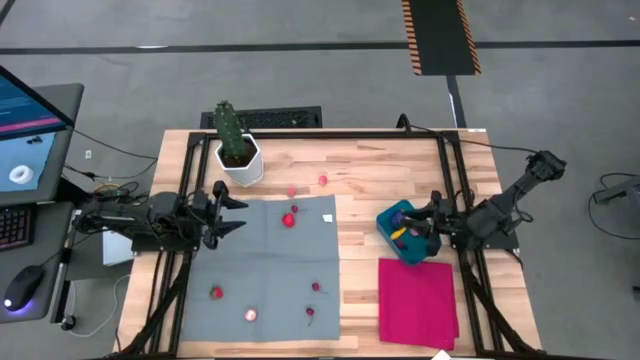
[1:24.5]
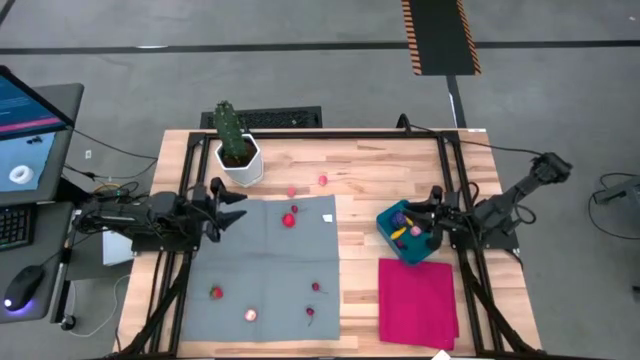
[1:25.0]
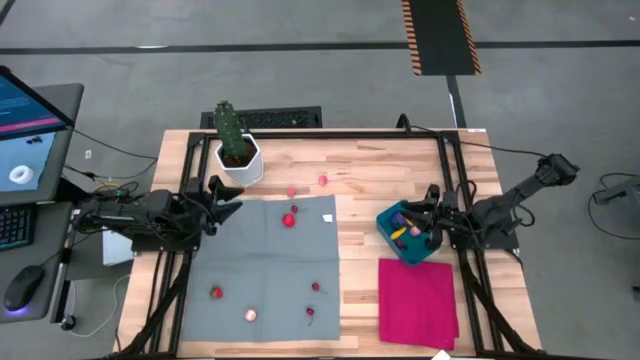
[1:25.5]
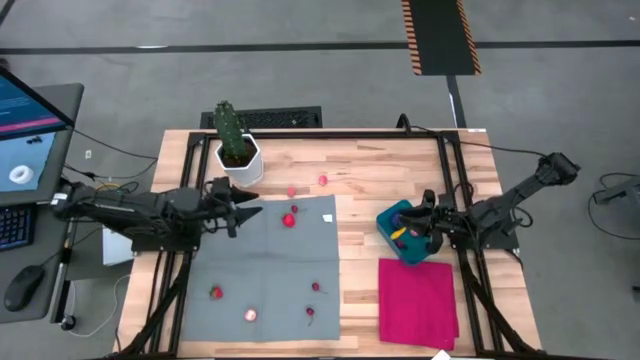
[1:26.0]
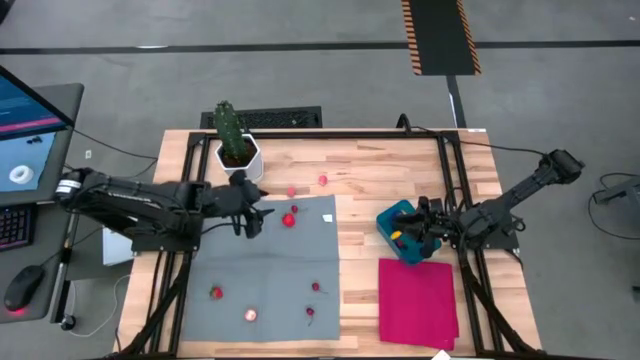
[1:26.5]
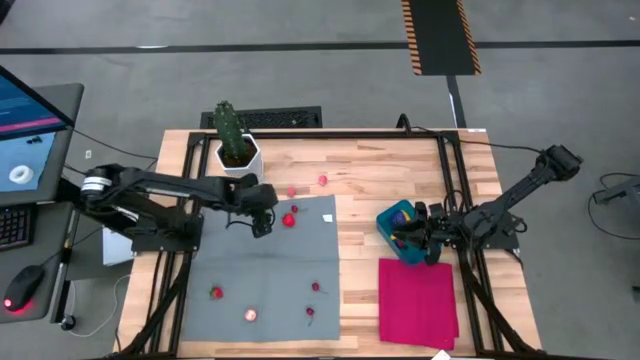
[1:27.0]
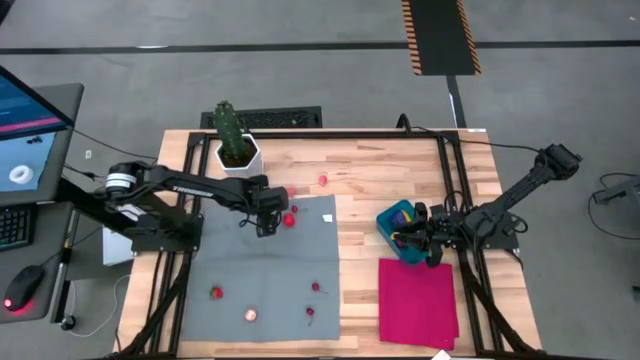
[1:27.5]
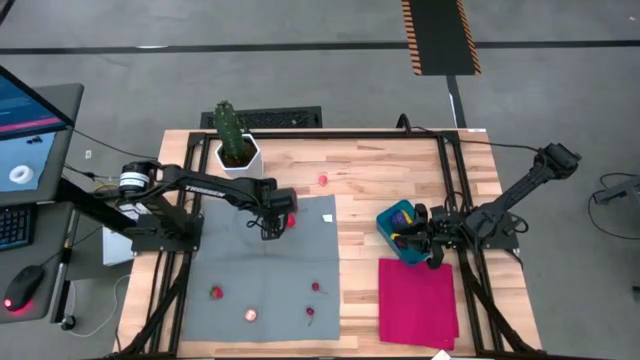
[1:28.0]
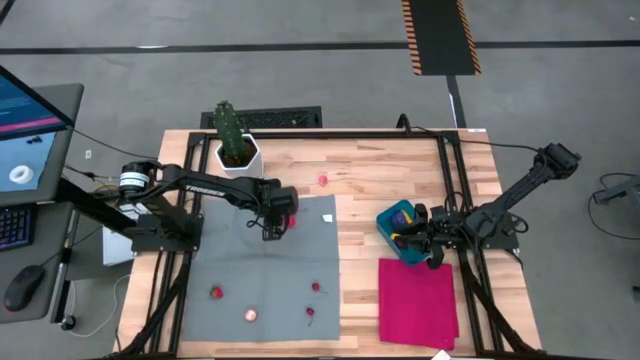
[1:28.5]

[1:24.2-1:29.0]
Task: Pick and placing Produce into tupperware
Put the red strawberry into the blue bin

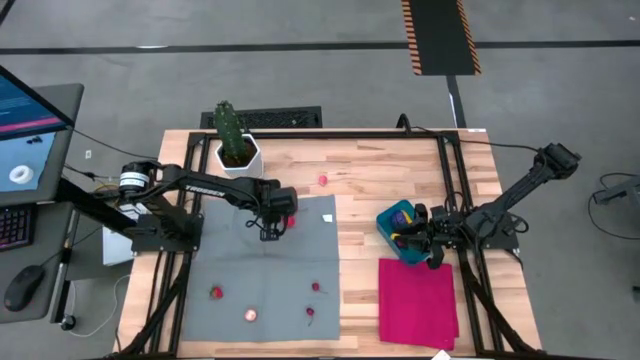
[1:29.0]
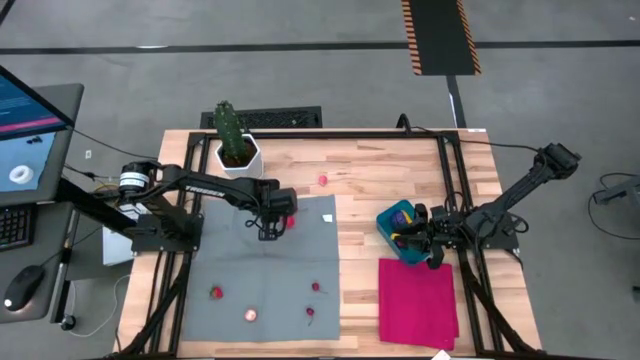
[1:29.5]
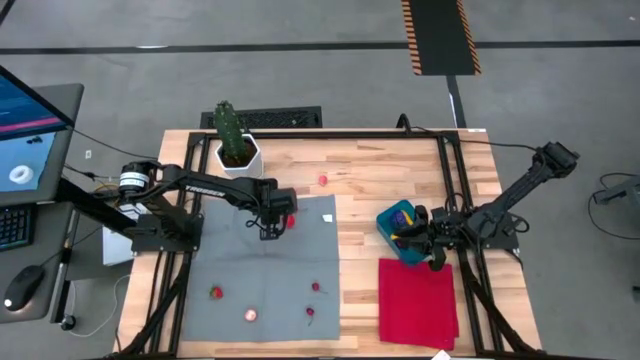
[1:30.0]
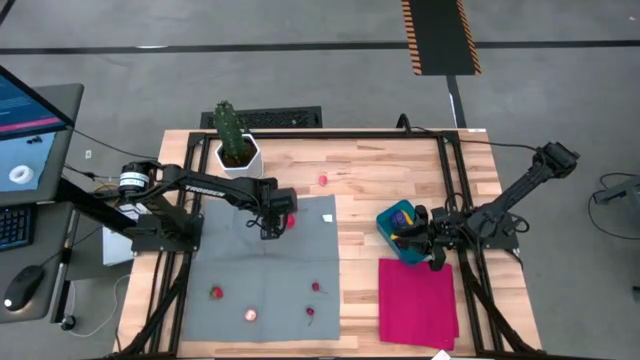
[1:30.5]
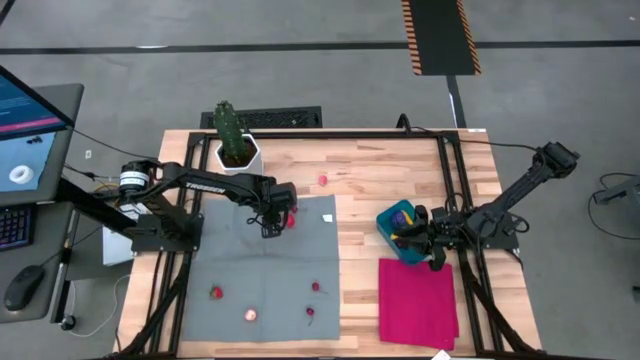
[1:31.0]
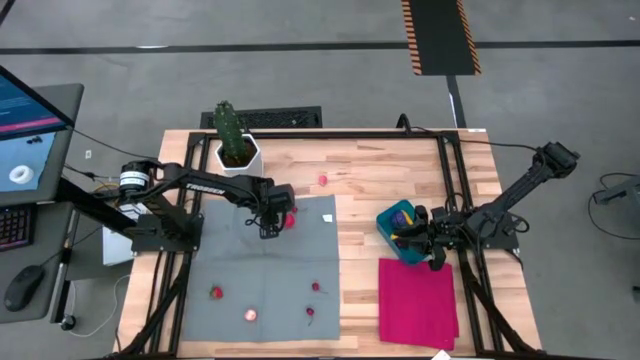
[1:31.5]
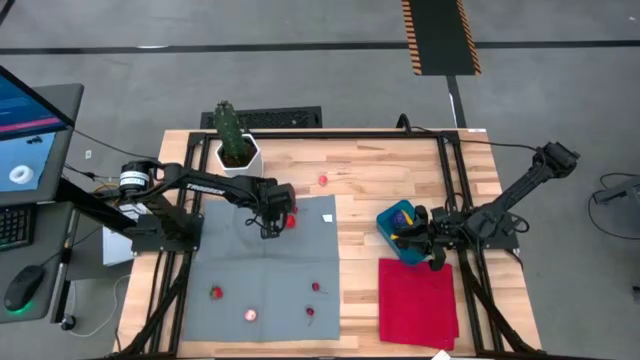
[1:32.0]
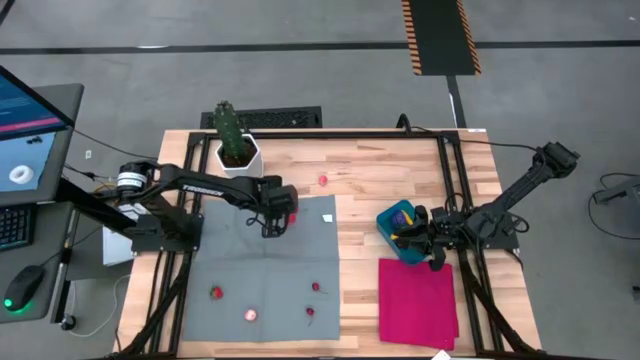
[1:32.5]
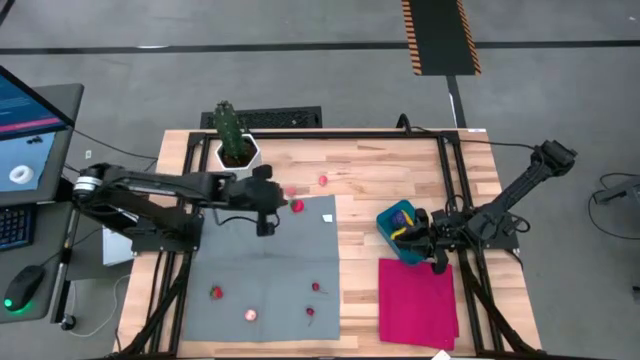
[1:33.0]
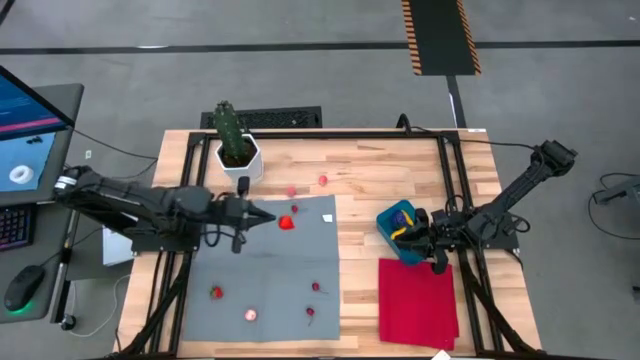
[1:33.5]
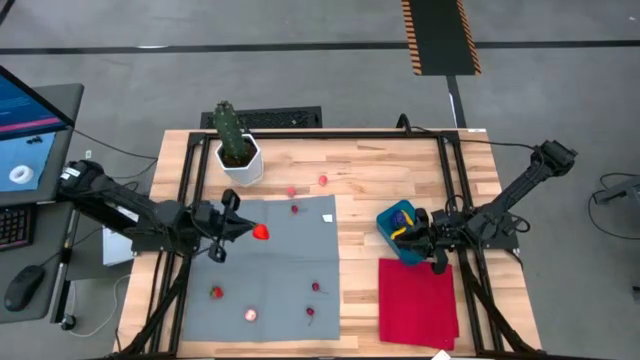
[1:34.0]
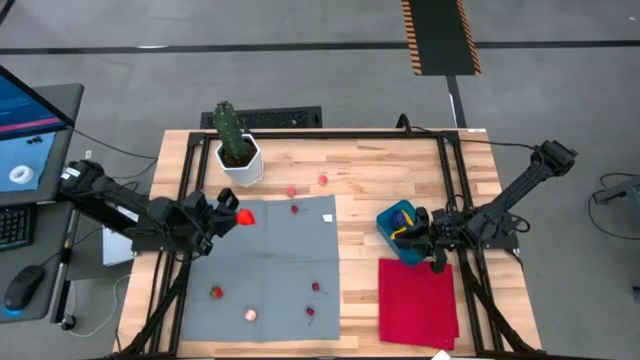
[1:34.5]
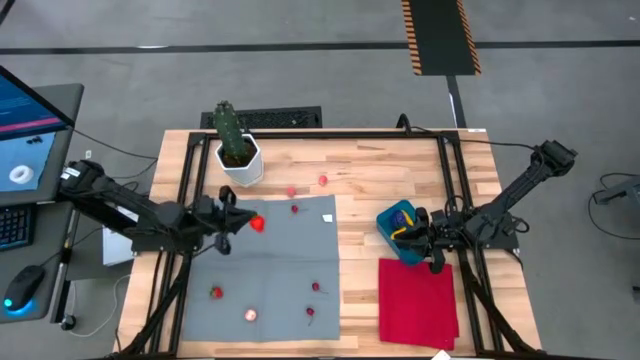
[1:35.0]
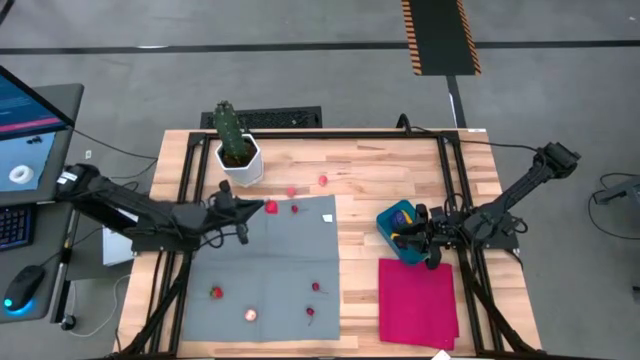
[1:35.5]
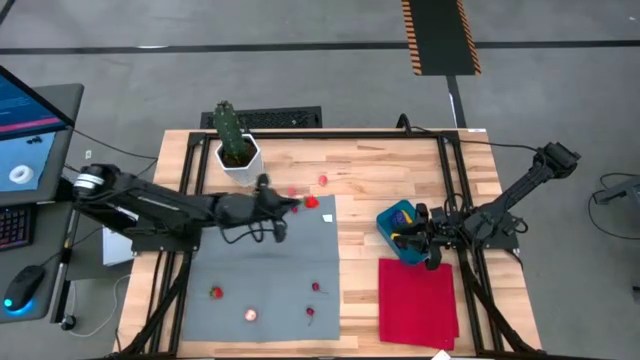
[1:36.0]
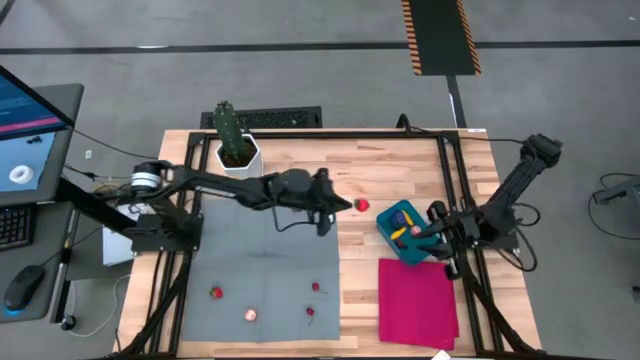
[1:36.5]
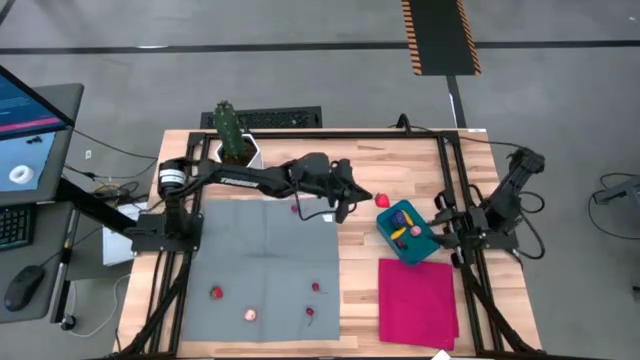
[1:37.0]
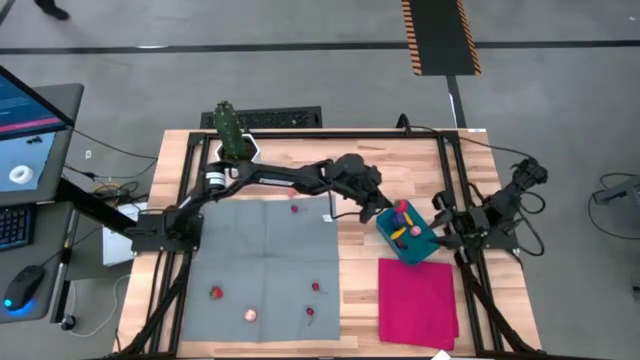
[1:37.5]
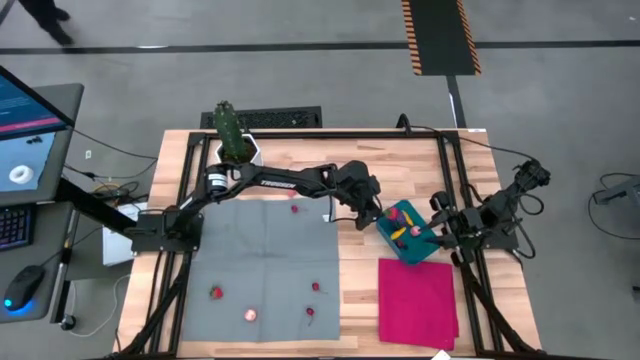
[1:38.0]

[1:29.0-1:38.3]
Put the red strawberry into the blue bin

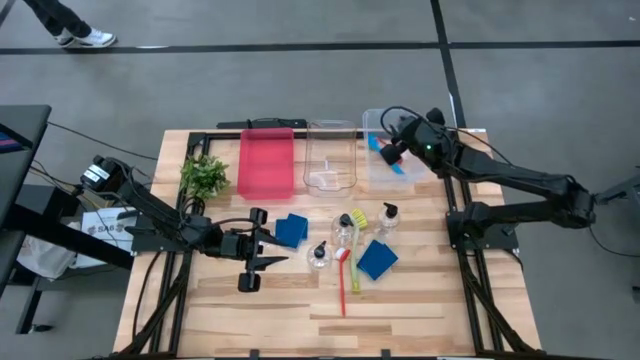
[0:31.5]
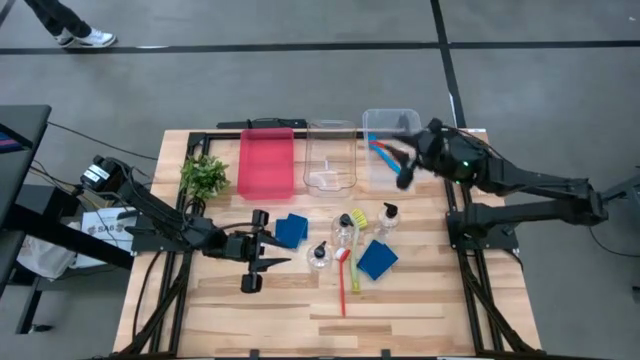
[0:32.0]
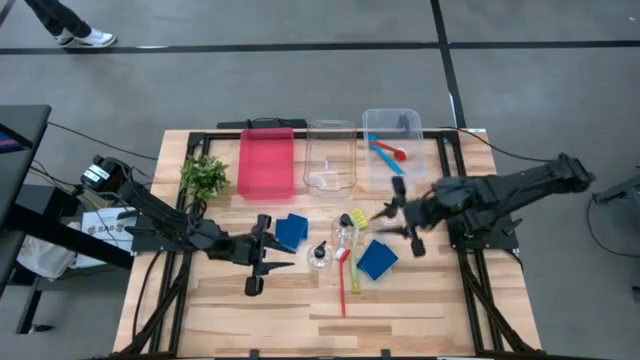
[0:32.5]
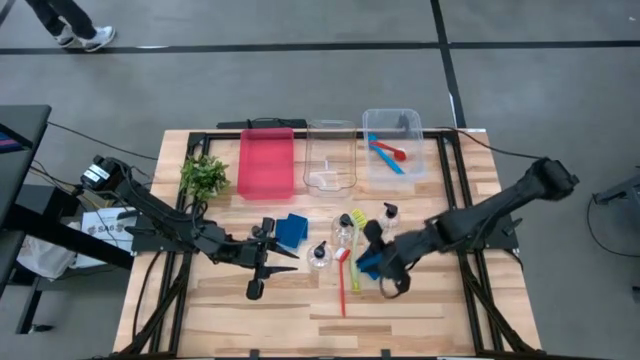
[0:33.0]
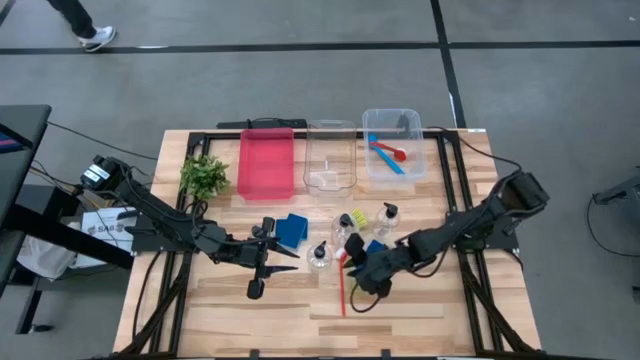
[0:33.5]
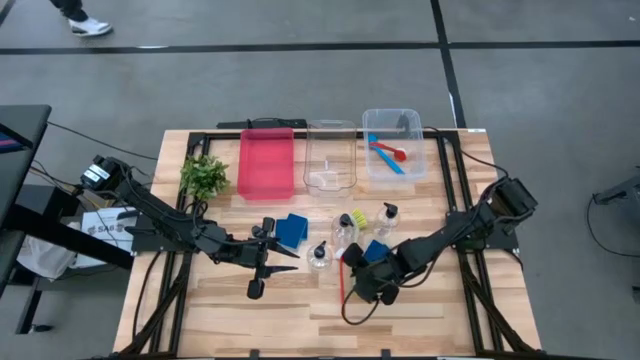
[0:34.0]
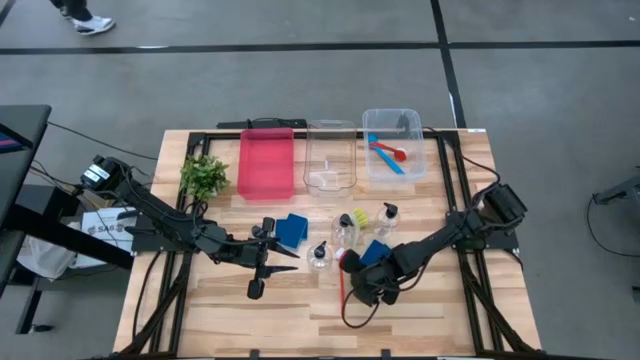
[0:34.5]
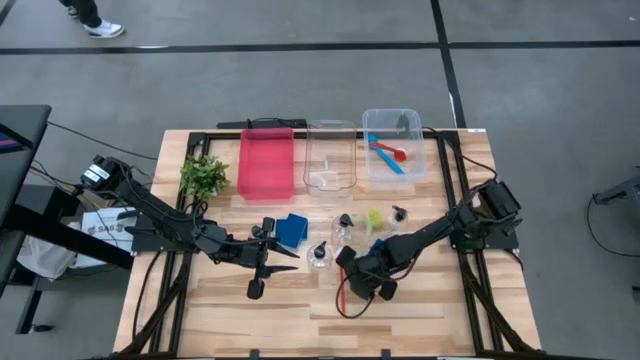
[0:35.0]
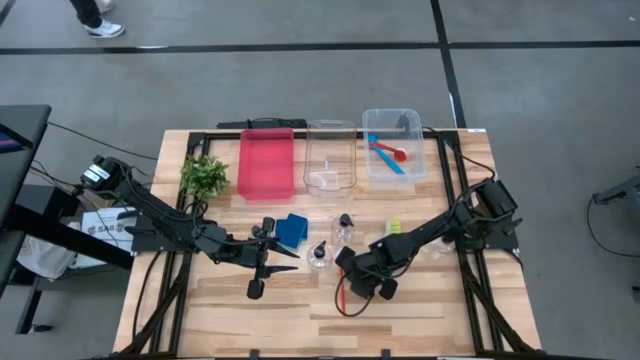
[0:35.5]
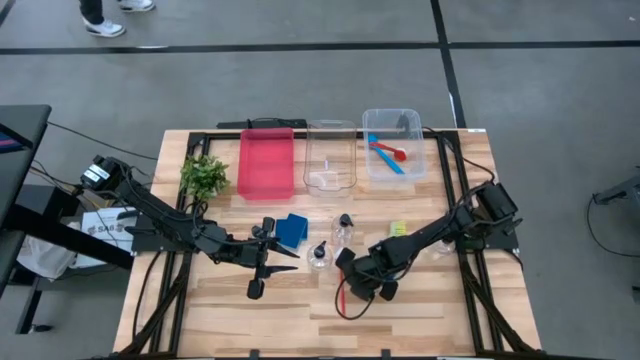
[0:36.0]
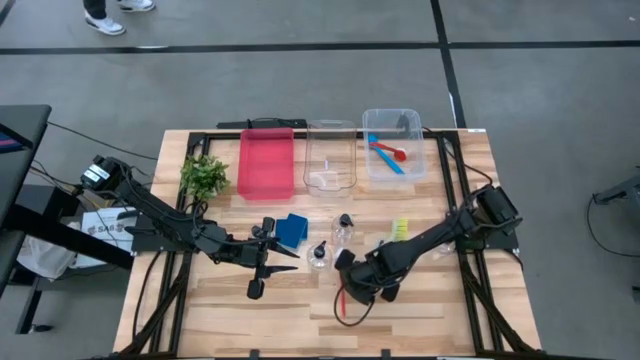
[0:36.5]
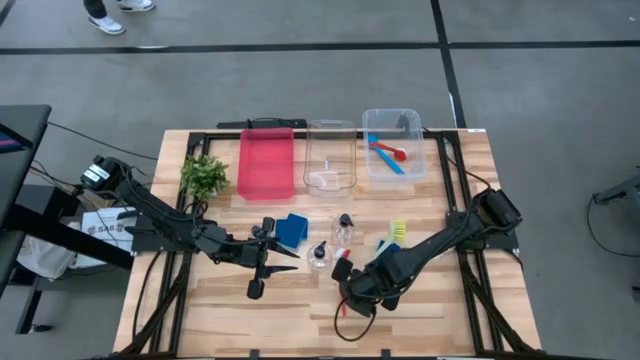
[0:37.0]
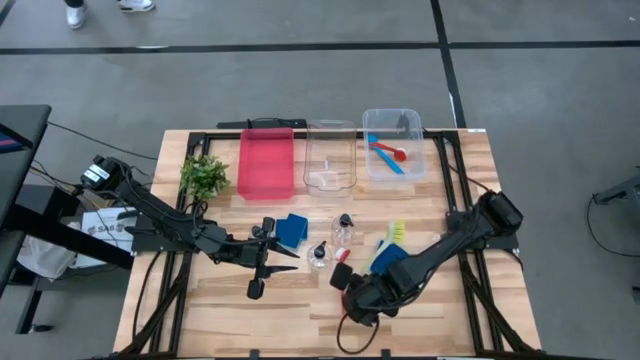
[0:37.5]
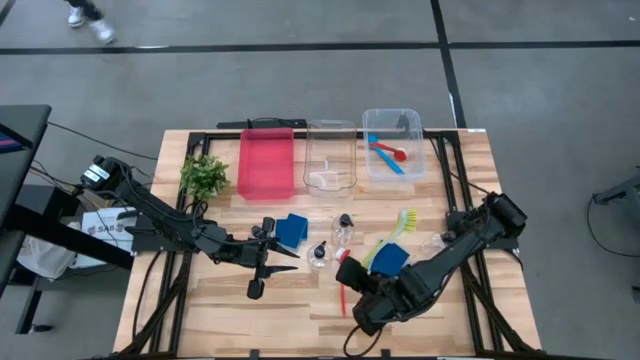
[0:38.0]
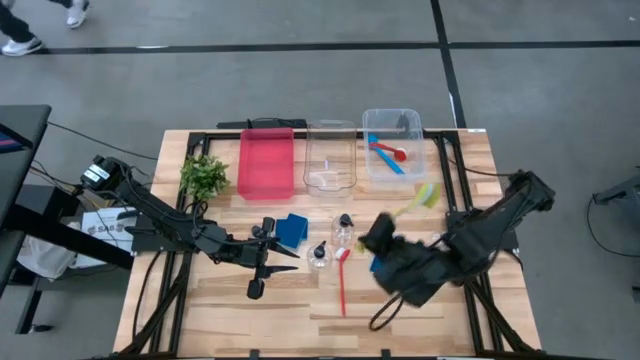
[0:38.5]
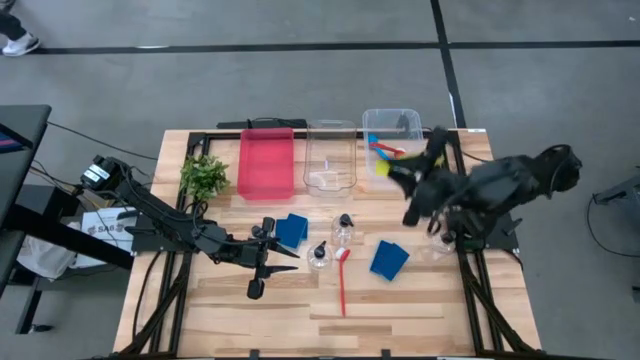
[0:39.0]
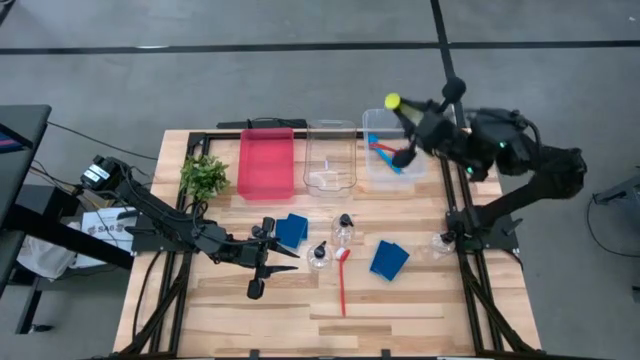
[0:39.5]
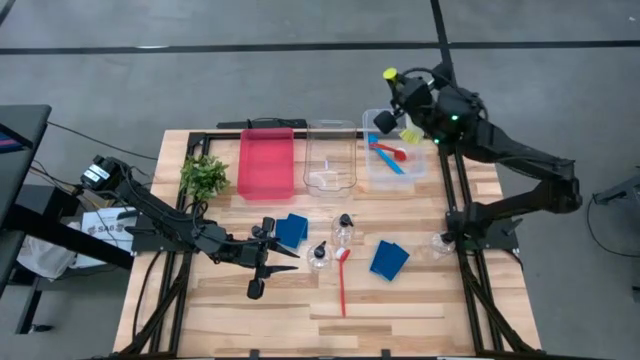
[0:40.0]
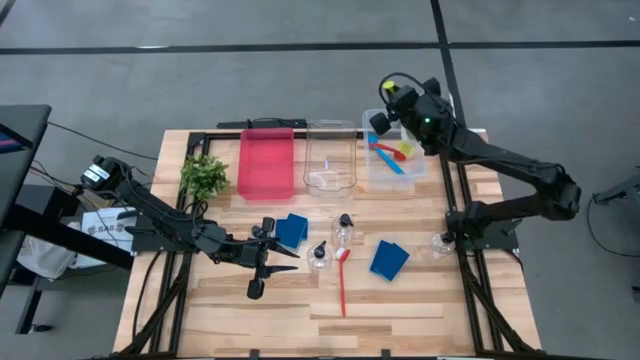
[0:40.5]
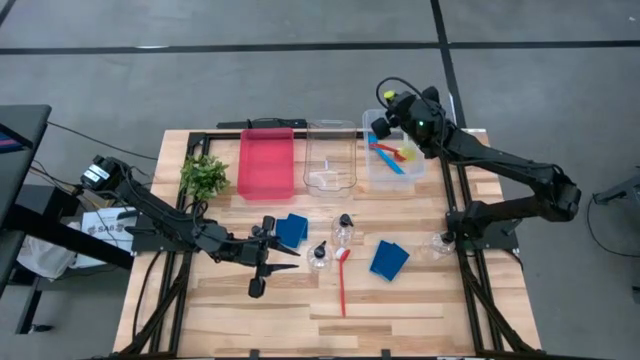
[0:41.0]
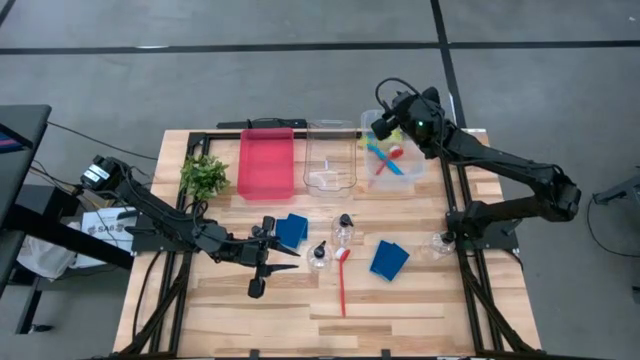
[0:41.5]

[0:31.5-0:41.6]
Task: Pick & Place Kitchen Sink Supplies
Put the green dishwashing brush into the white transparent bin
